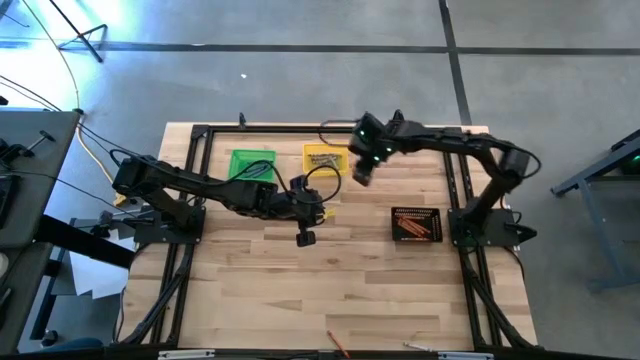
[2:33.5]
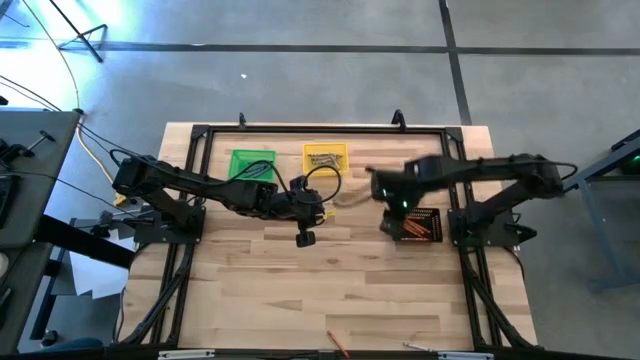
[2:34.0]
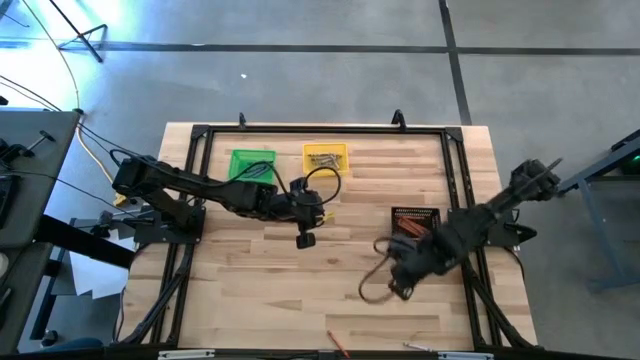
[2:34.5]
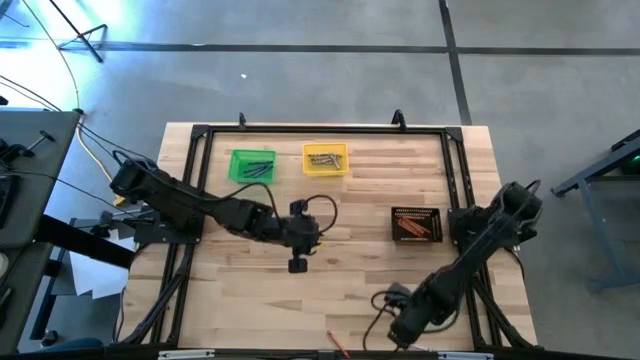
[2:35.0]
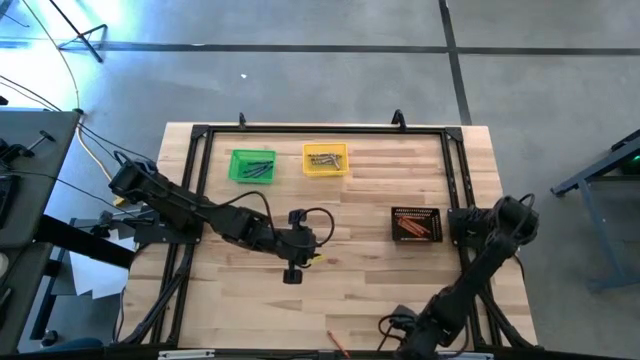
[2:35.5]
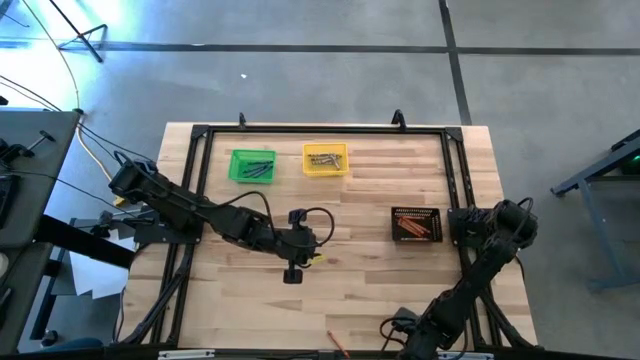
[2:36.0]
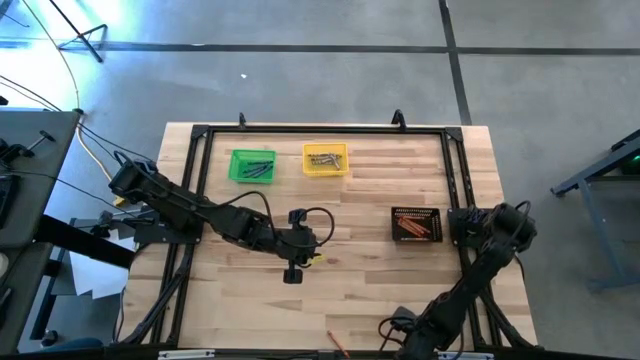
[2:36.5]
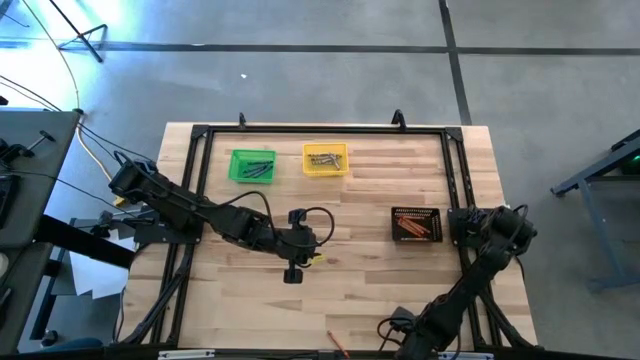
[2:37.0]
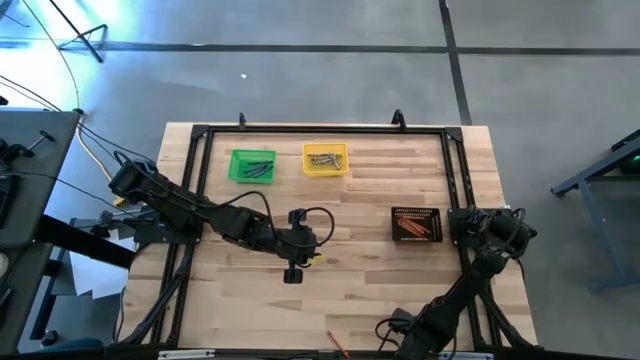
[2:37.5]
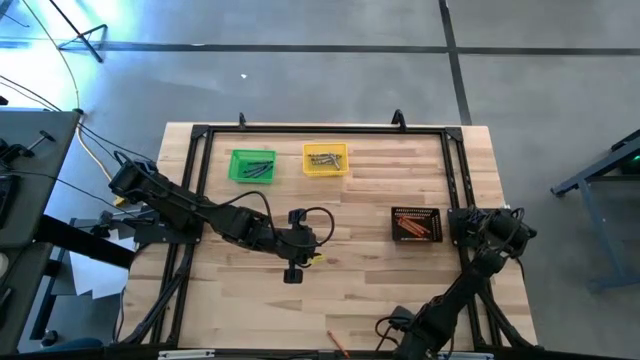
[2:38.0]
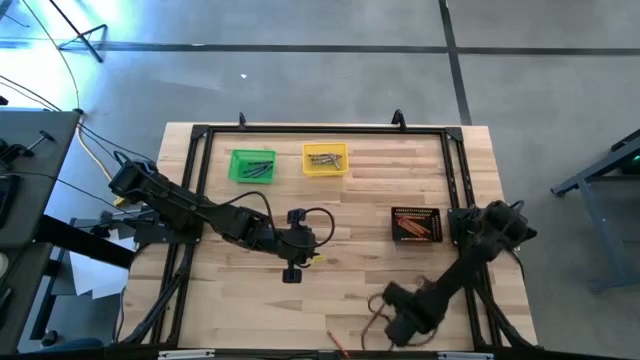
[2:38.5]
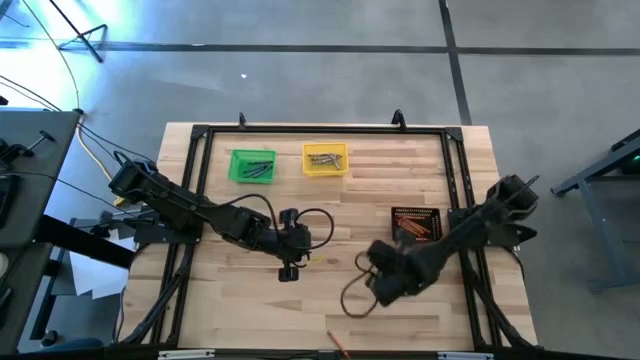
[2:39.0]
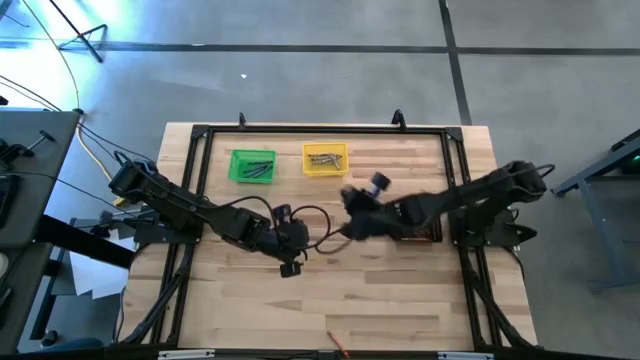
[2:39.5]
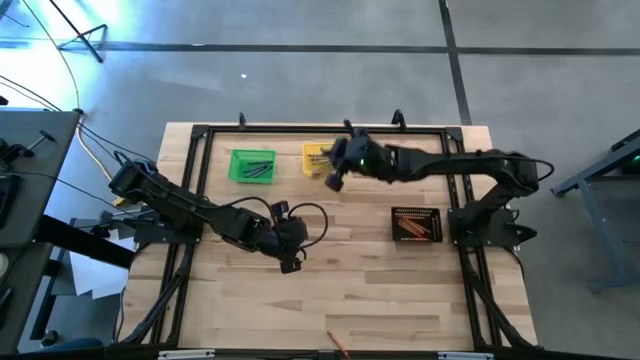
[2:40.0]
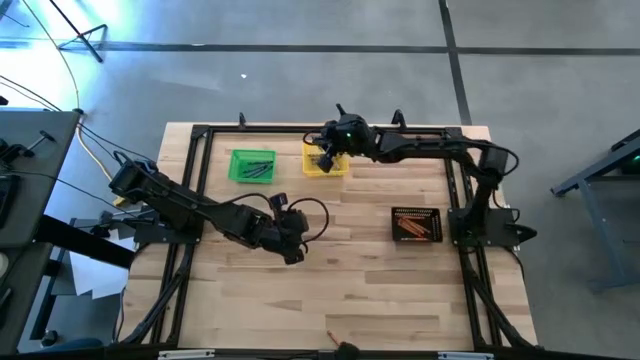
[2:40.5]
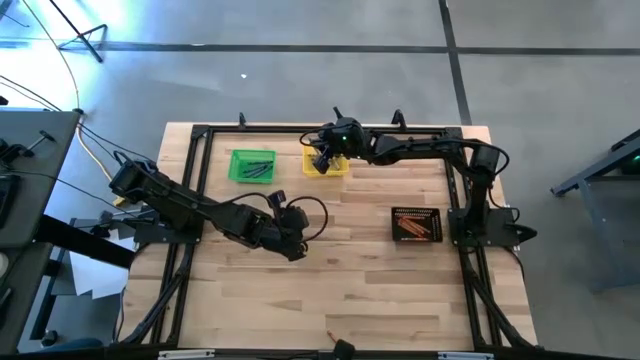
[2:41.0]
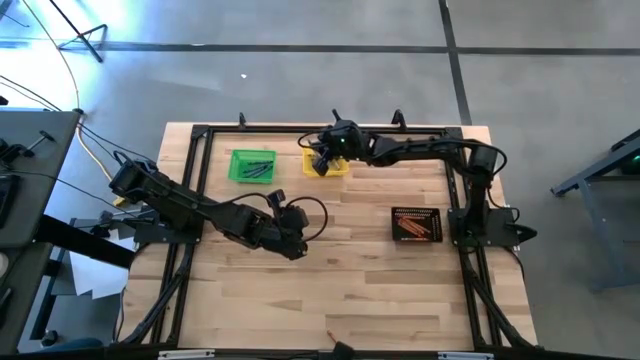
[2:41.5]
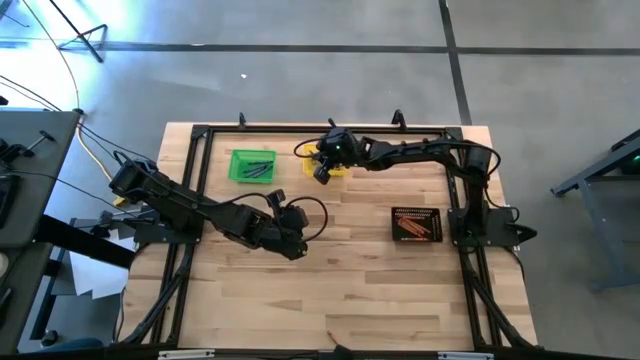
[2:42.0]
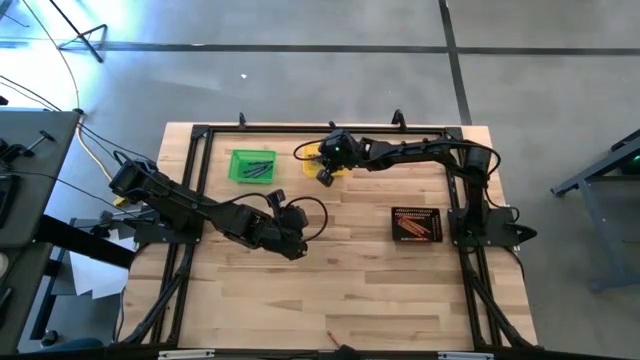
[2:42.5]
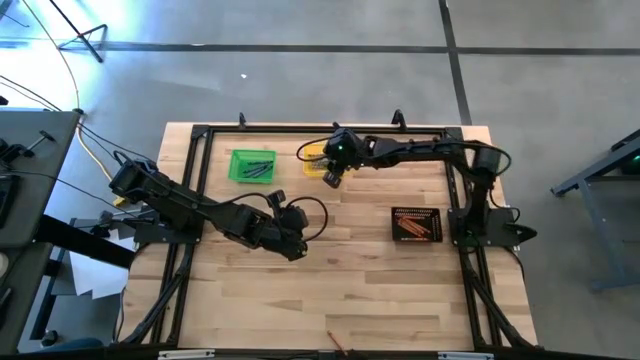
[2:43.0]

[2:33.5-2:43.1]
Task: Sort crayons
Put the gray crayon into the yellow bin

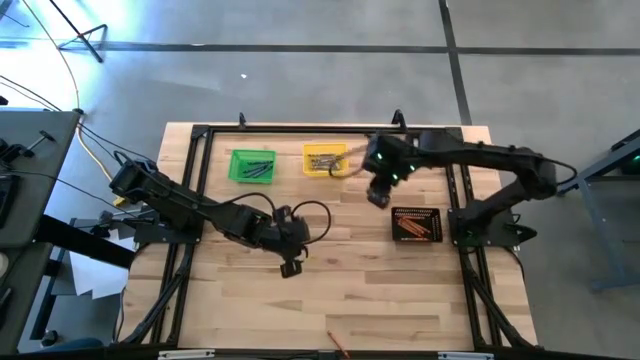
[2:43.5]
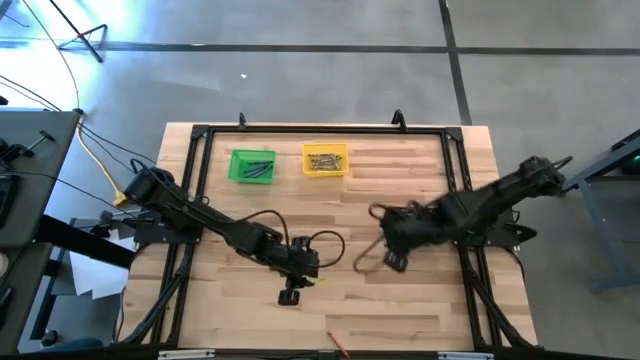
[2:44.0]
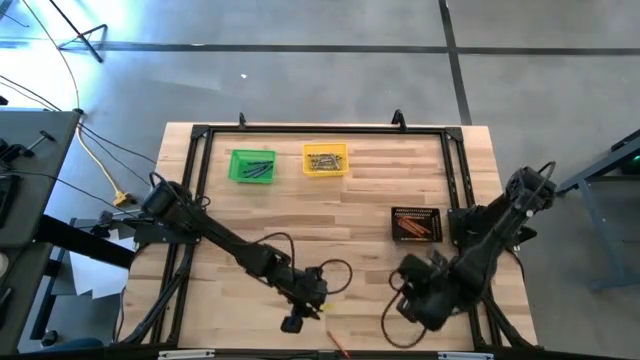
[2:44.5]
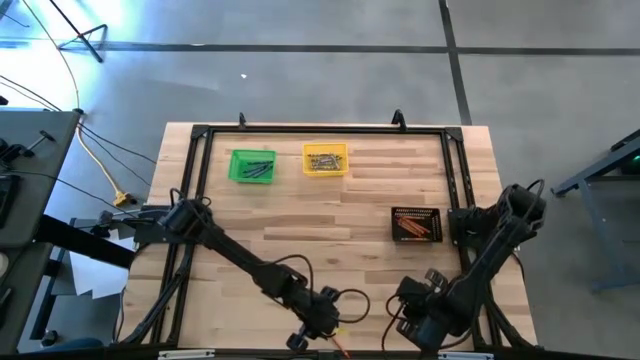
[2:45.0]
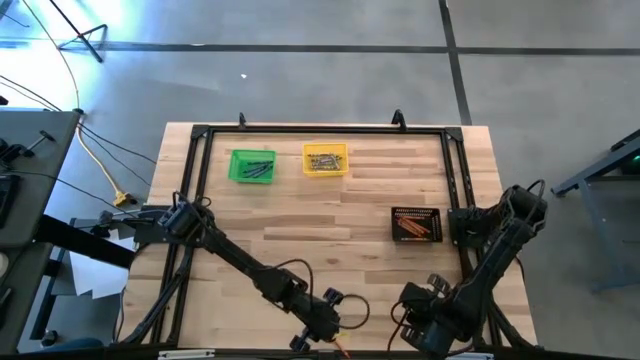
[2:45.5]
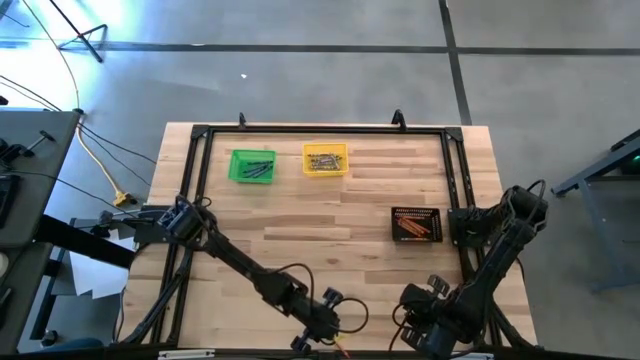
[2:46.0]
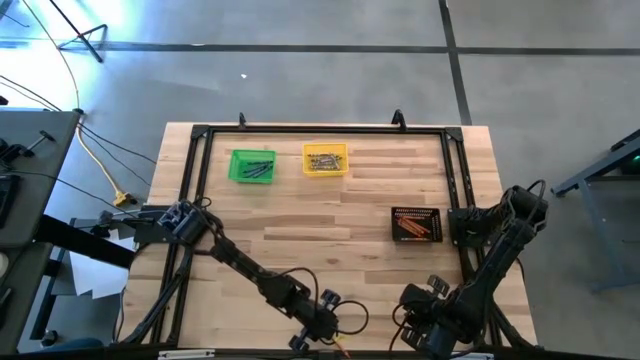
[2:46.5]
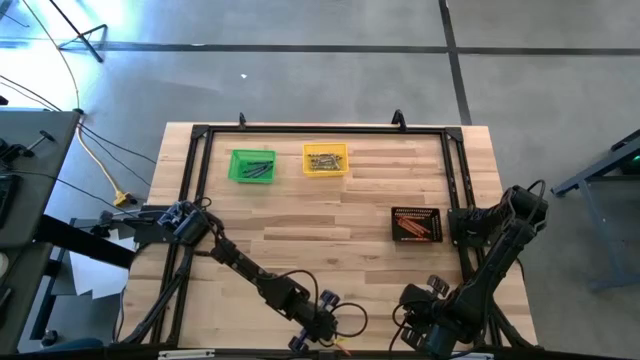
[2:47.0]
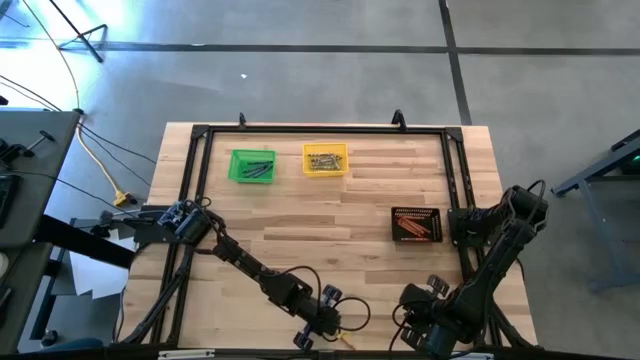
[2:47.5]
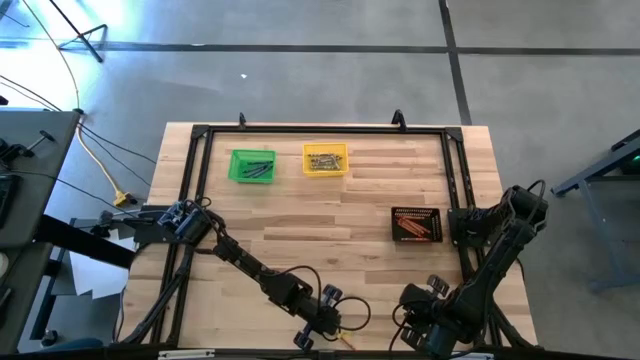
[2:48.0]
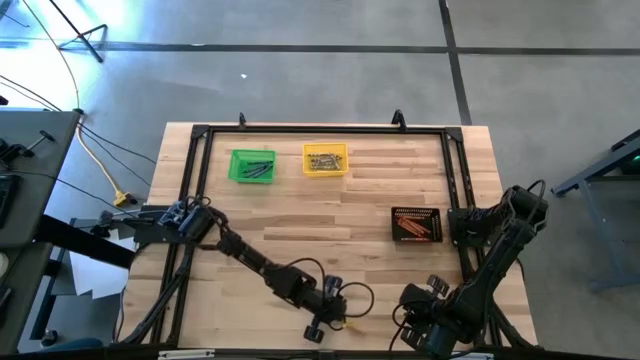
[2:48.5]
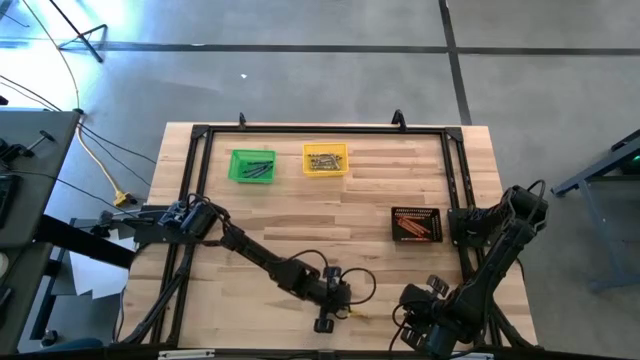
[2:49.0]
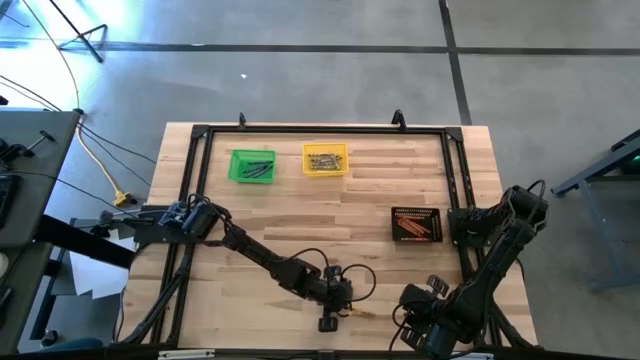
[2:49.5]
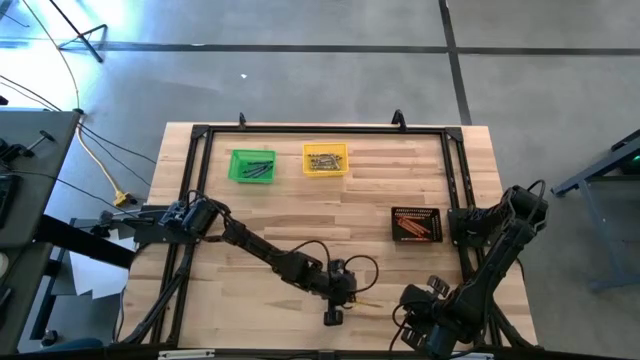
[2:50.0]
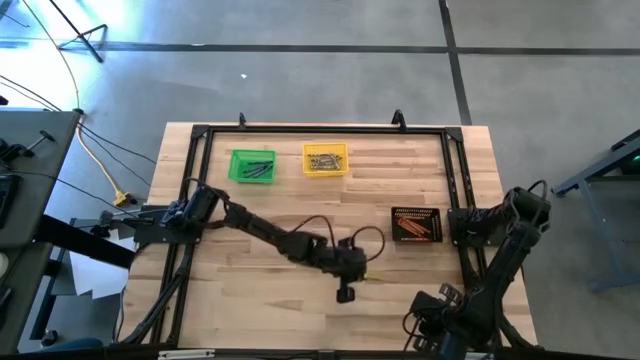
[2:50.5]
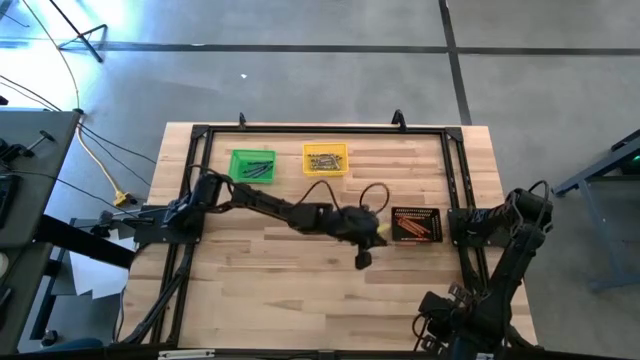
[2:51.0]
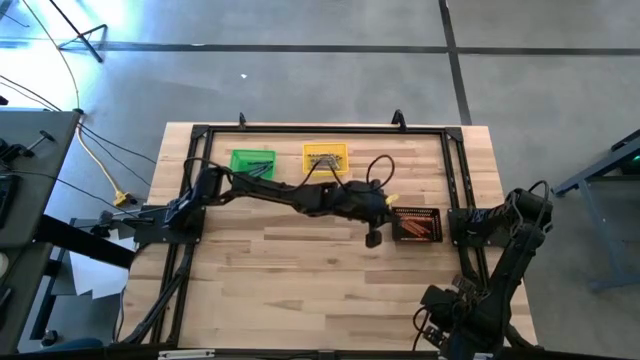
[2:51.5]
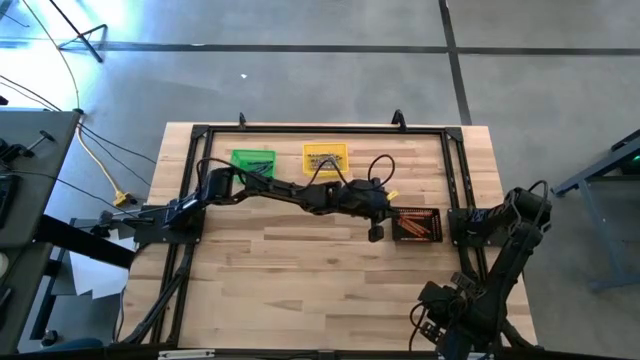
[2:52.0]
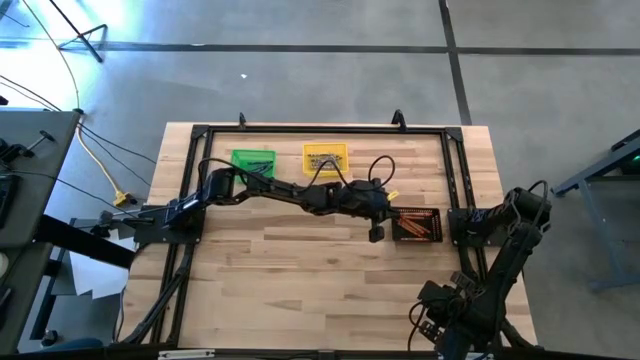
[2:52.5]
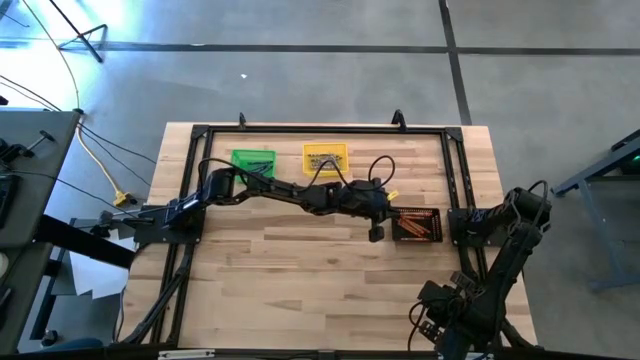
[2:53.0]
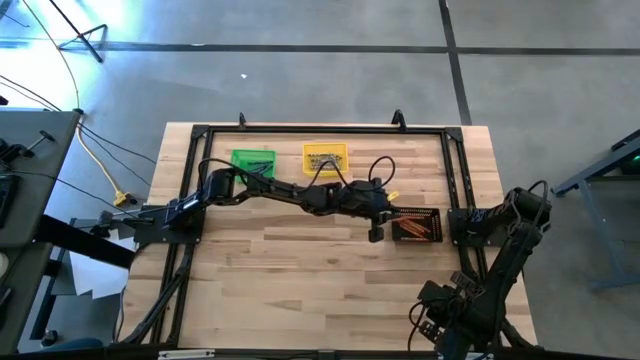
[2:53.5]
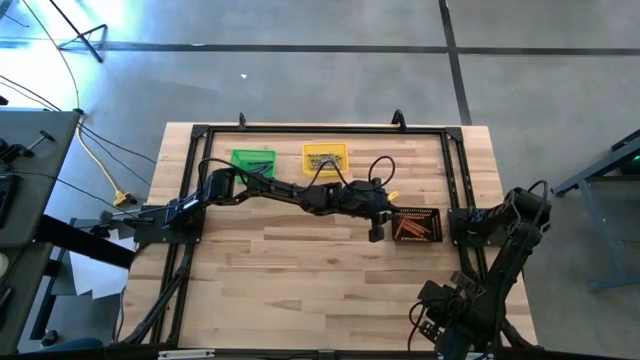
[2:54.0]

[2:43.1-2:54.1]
Put the orange crayon into the black bin
